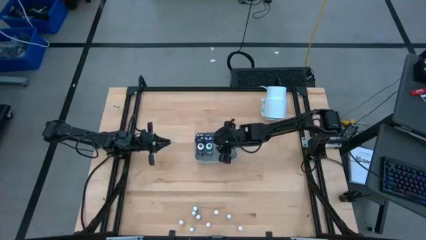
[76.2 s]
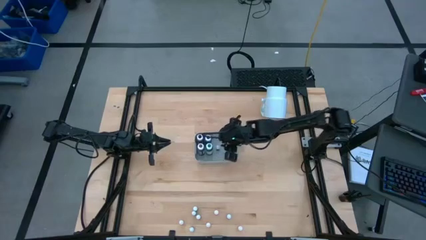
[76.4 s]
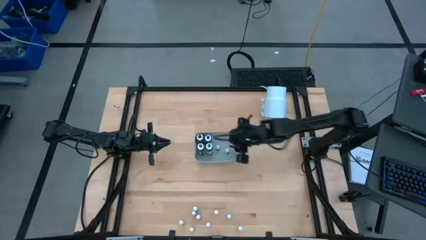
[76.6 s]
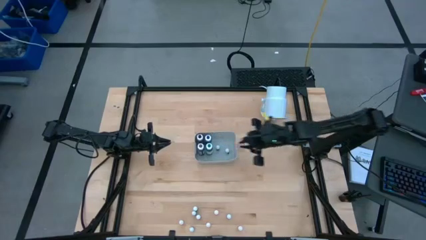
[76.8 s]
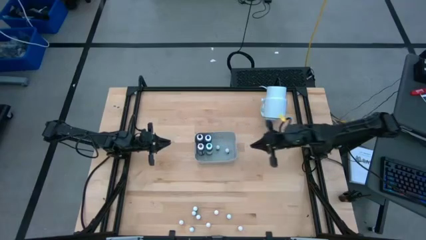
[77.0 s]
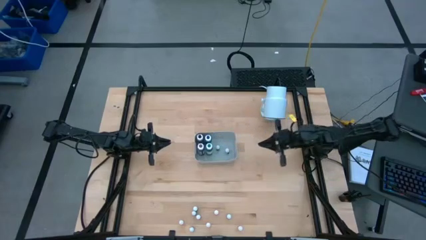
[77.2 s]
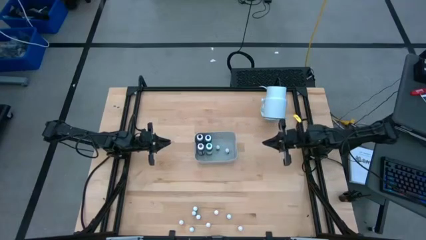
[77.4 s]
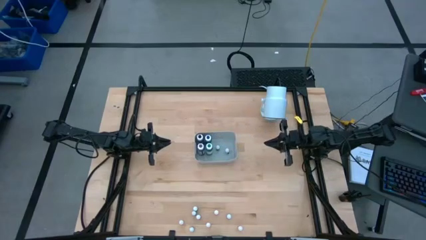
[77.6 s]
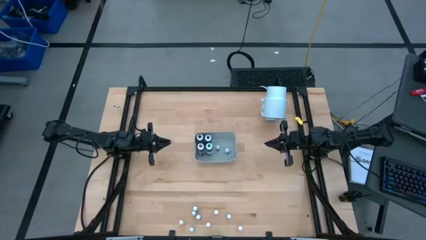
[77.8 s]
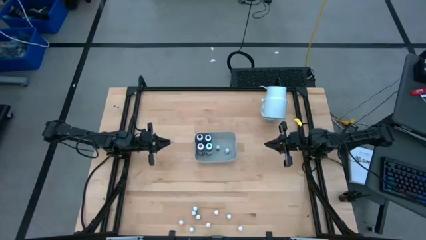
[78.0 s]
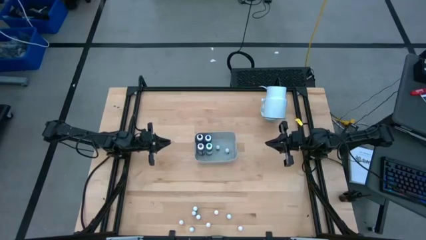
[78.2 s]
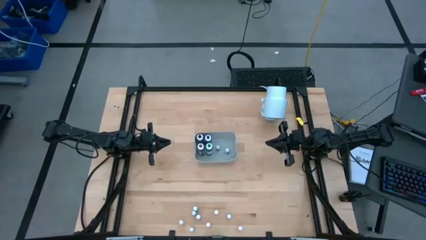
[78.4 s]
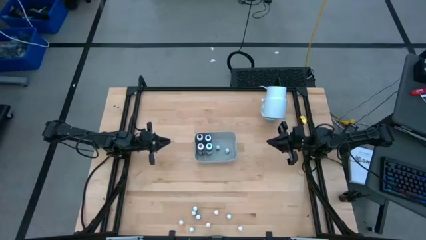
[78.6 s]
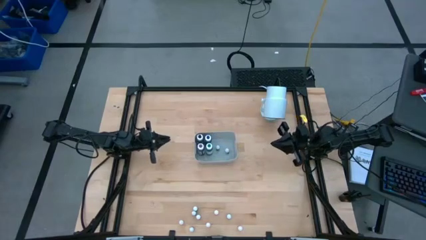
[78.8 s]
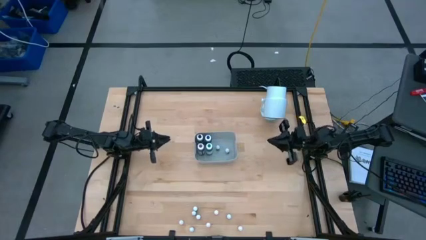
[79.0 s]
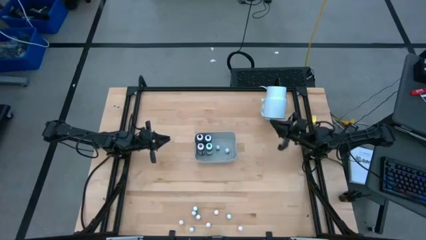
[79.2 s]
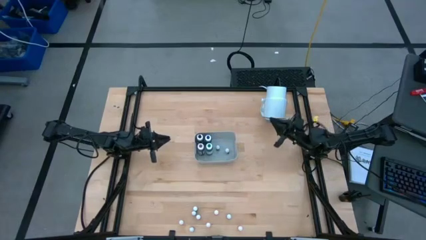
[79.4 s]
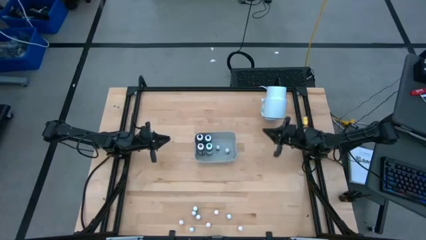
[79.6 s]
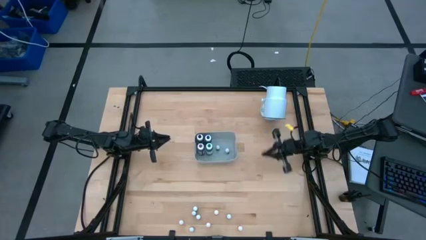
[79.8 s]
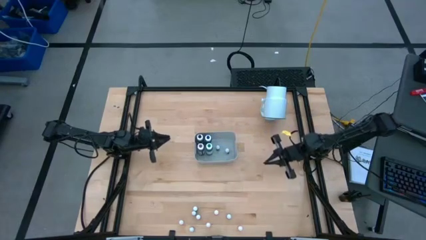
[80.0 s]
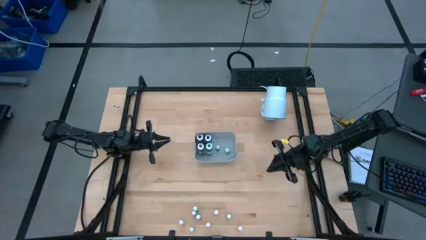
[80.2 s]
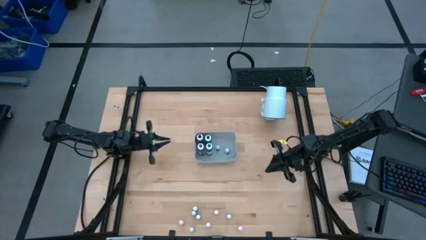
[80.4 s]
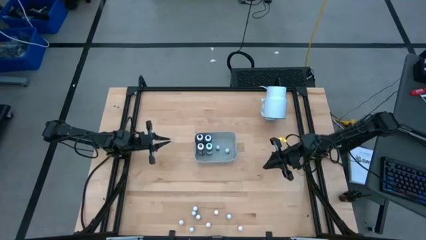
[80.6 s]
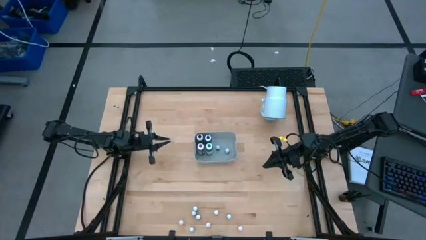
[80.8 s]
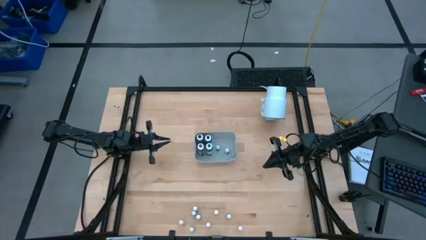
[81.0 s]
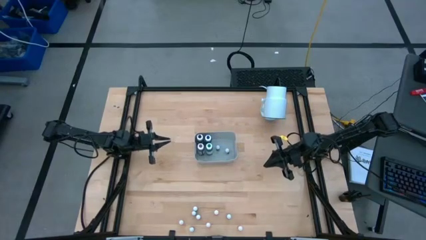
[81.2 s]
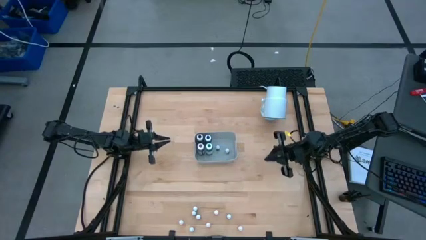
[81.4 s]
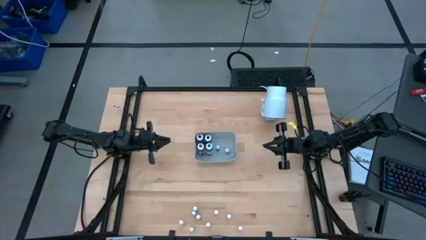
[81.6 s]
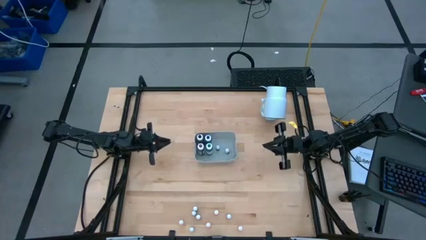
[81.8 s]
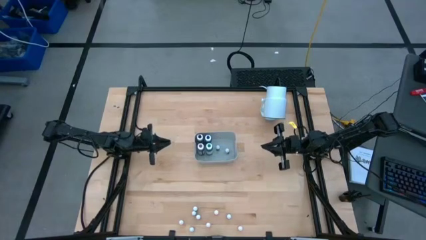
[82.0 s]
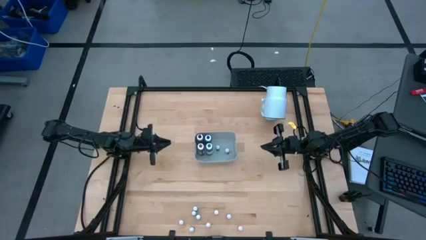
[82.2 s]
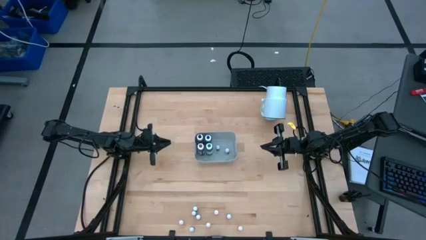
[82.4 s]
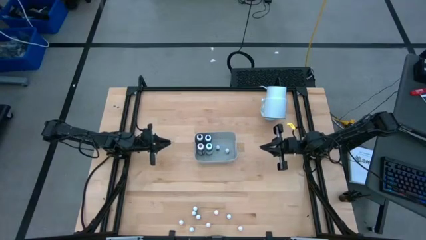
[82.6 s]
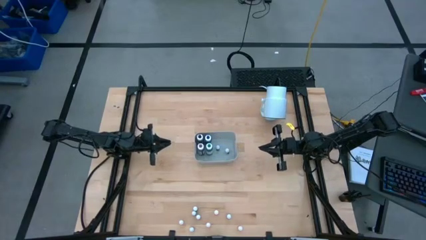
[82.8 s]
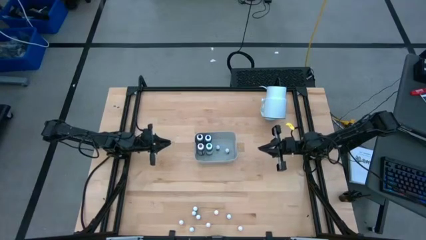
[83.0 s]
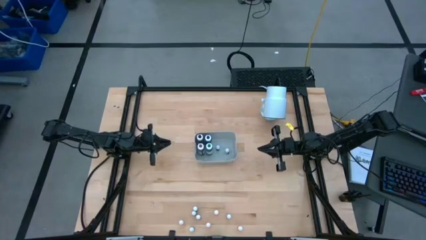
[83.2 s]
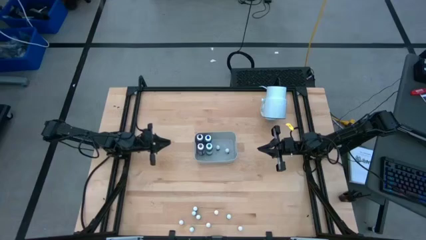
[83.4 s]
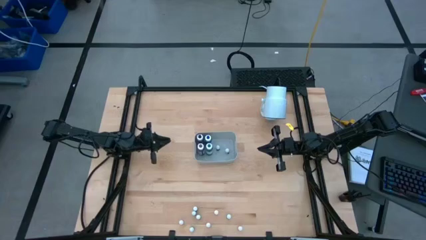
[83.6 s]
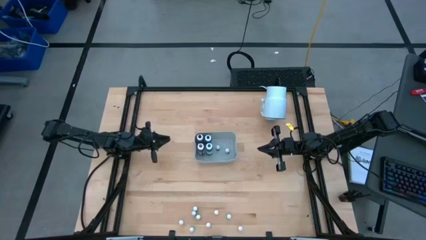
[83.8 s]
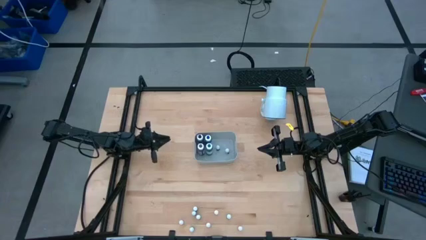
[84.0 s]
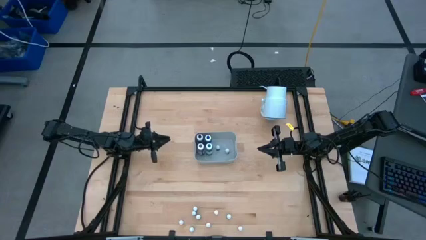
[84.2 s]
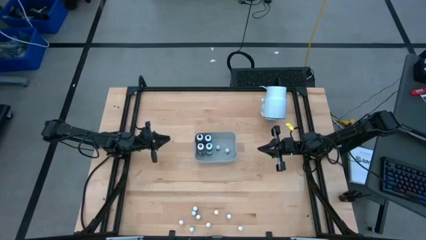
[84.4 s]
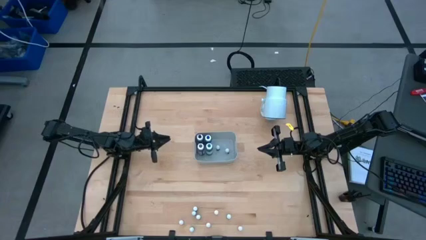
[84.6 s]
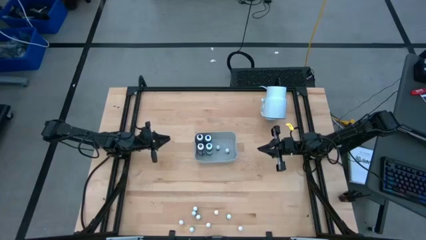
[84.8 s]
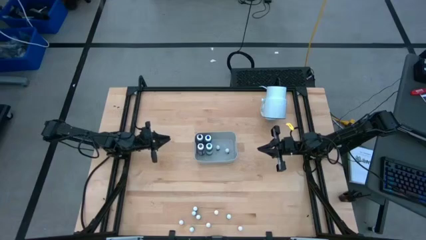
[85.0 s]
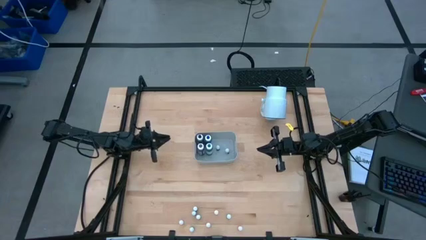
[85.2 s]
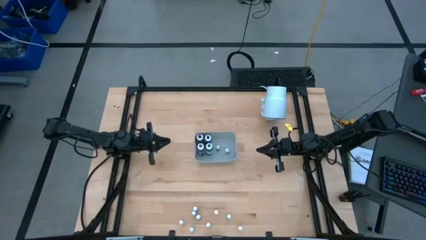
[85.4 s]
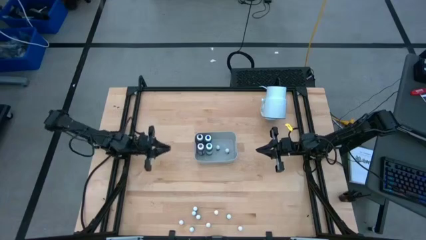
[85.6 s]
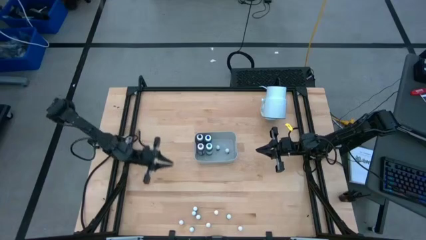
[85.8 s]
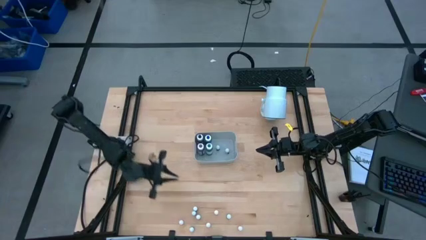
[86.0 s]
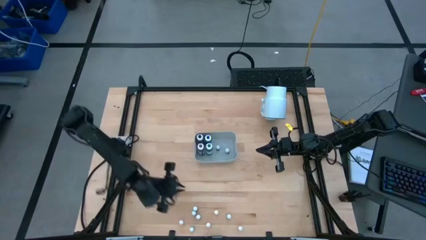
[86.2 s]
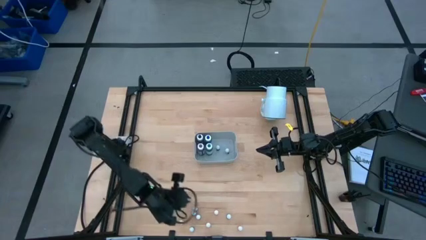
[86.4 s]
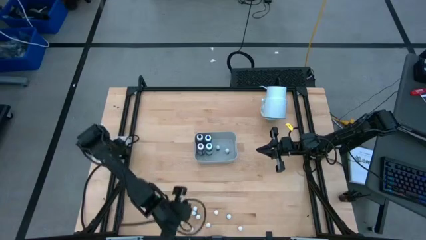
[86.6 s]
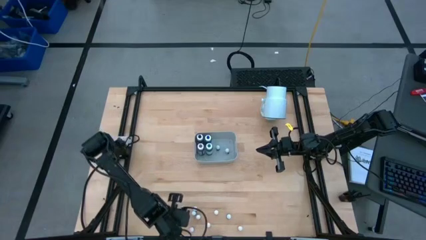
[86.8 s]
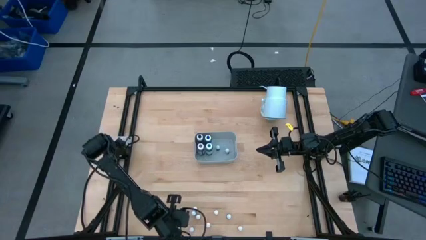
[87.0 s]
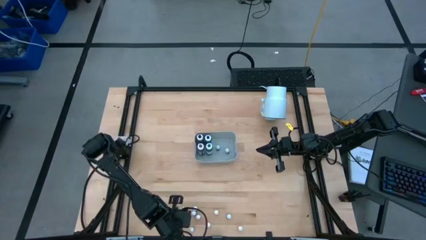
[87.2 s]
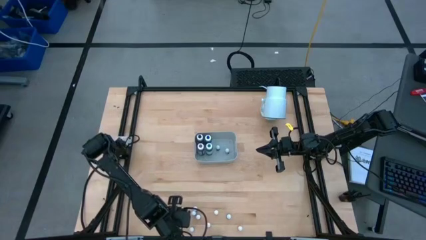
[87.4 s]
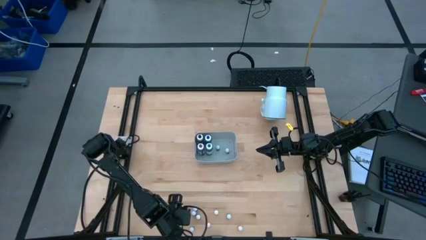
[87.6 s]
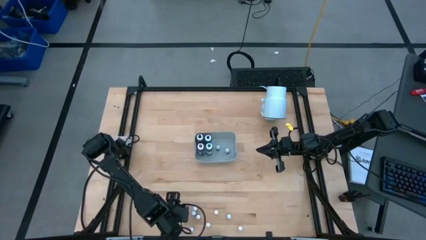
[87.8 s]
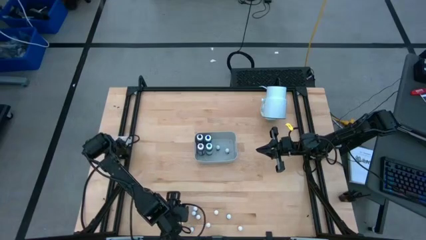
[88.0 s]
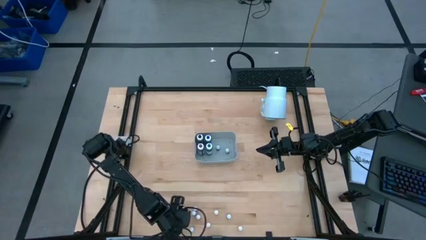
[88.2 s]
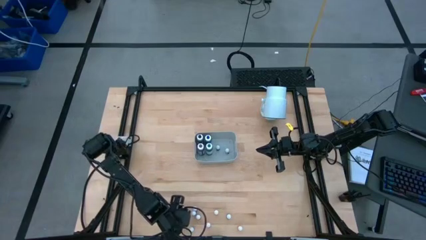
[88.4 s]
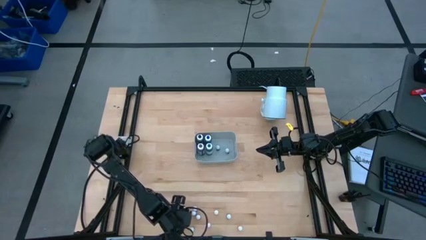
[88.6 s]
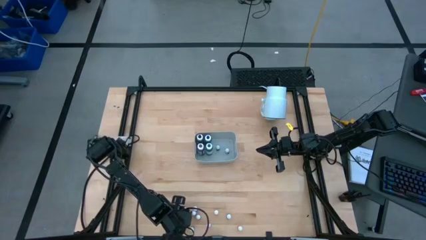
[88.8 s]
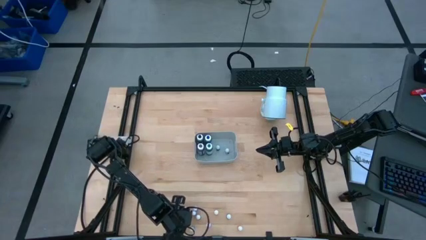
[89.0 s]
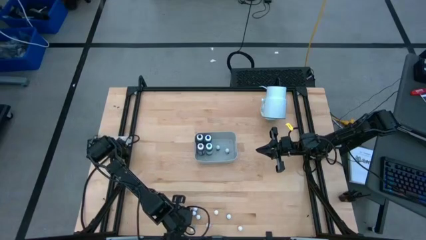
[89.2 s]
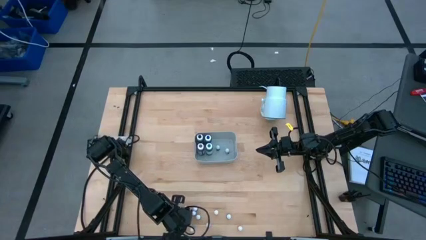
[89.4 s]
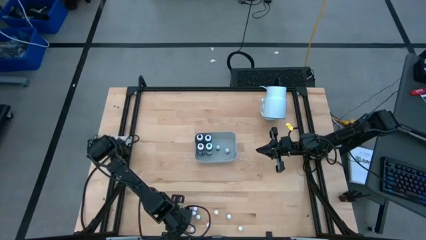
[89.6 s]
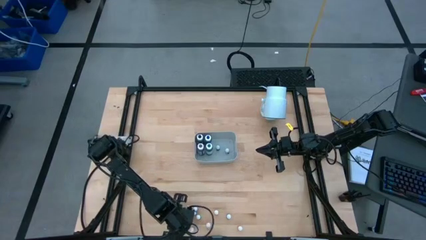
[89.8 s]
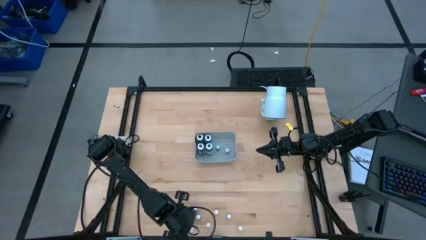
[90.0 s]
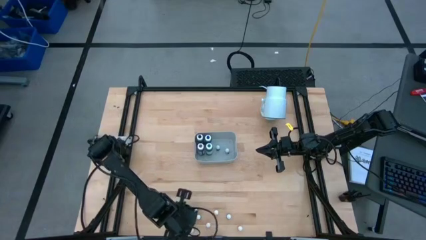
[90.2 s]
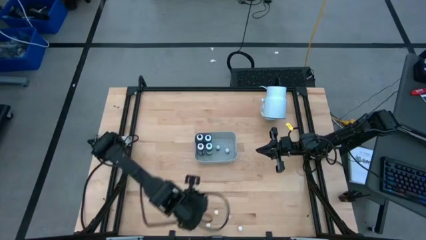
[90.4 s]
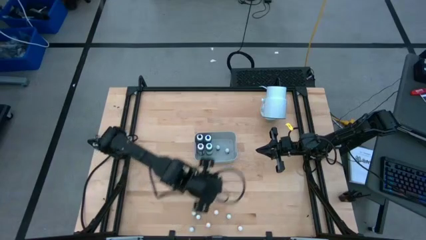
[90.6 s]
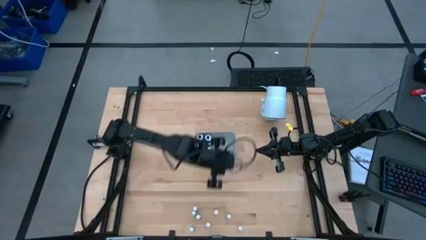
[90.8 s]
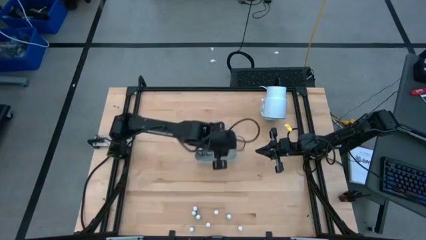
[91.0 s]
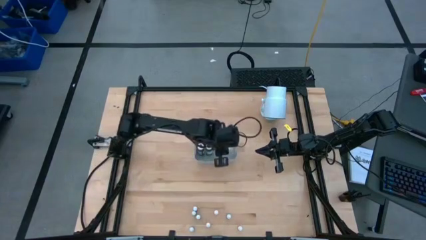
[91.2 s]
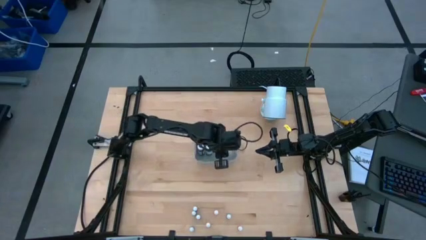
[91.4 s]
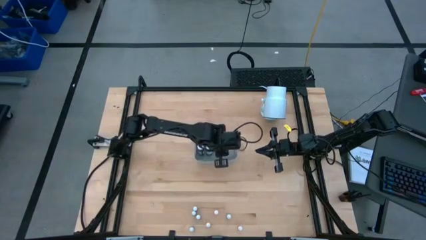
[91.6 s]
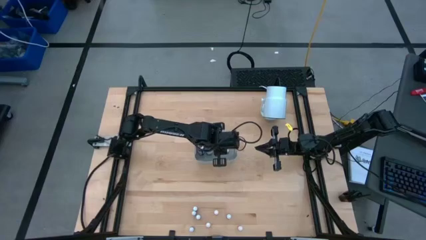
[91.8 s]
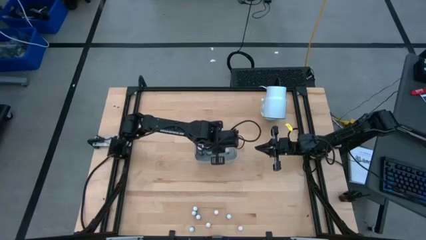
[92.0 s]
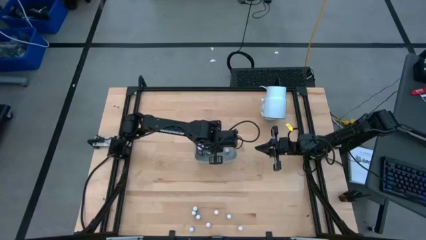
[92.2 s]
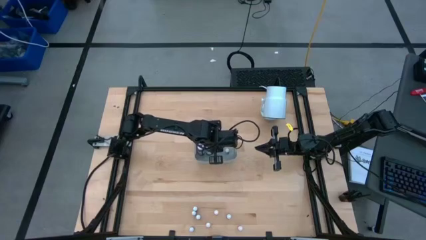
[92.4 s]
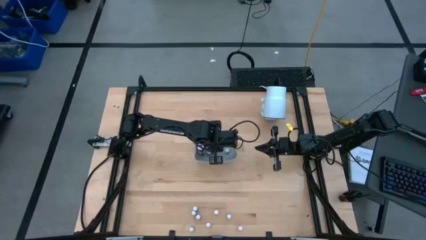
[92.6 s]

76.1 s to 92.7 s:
Task: Pick & Place food coloring
Put the small yellow food coloring bottle into the white bin

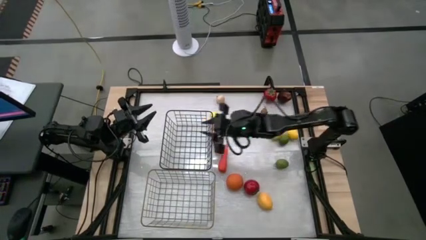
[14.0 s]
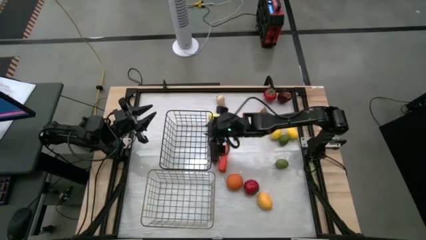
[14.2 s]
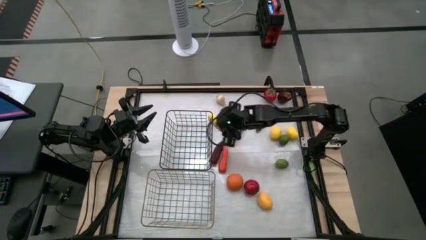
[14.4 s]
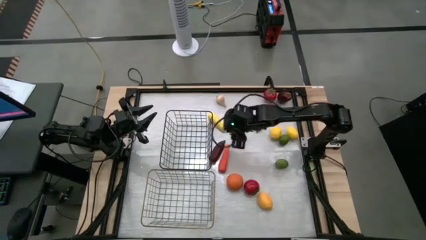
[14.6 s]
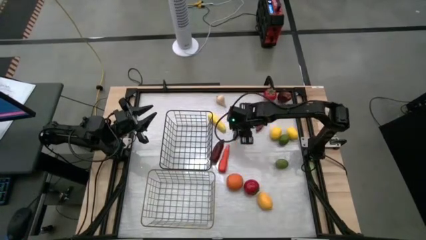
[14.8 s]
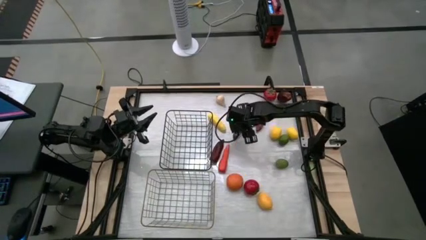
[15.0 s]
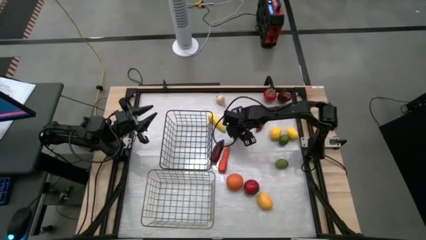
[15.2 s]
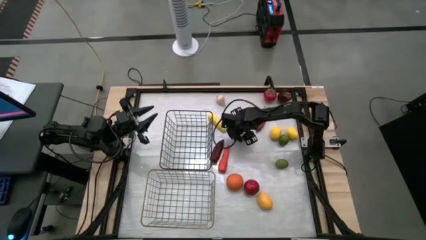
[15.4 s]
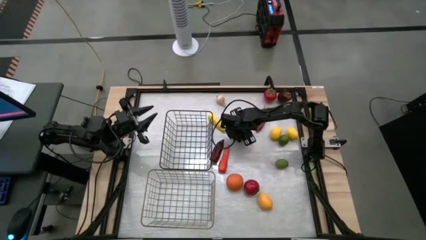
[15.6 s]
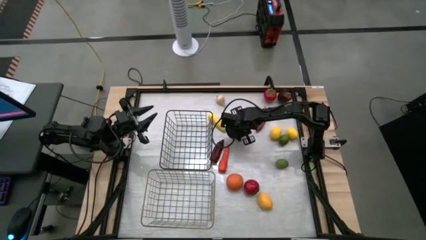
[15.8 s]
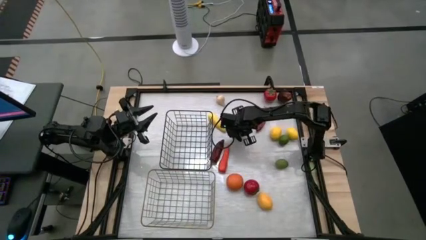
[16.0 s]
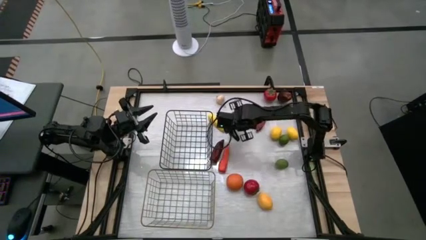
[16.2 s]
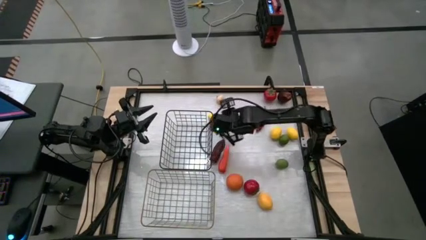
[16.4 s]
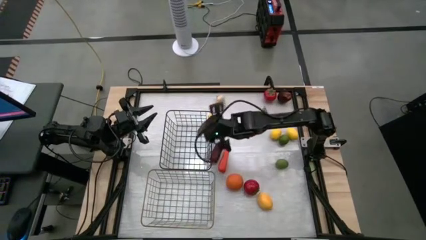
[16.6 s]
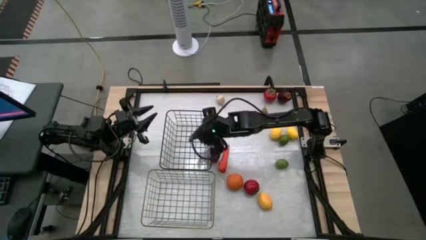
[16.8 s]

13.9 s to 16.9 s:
Task: Sort produce into baskets
Put the pepper into the black wire basket
